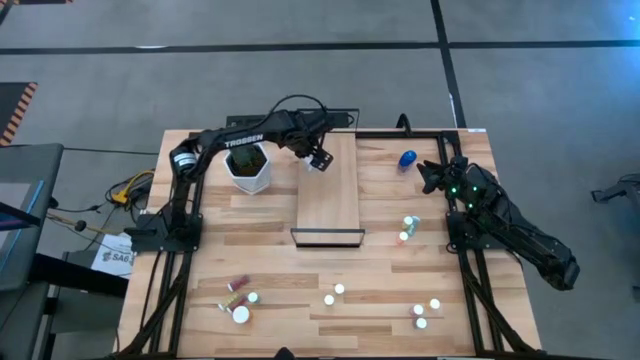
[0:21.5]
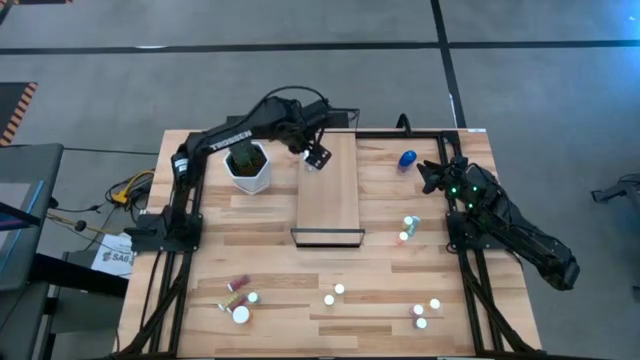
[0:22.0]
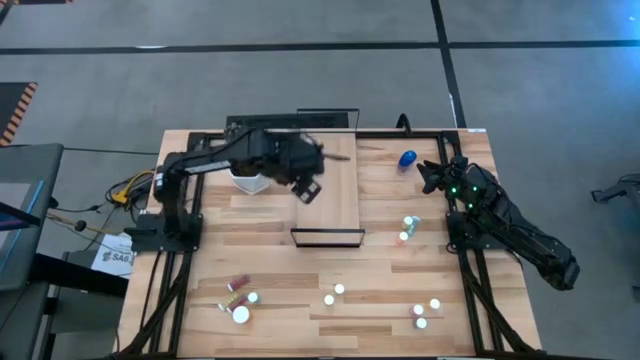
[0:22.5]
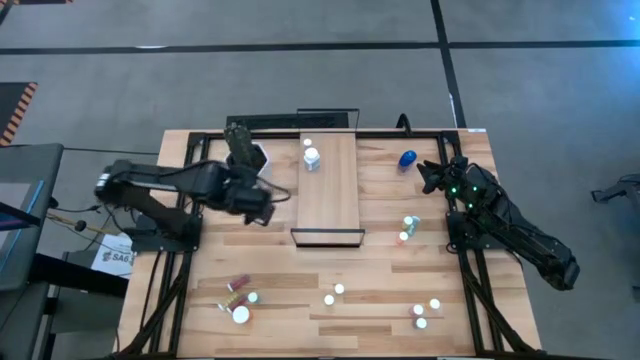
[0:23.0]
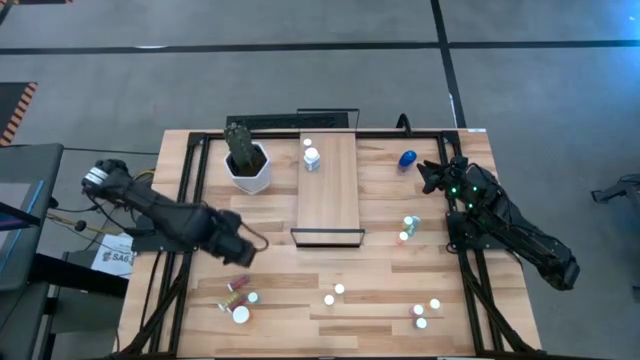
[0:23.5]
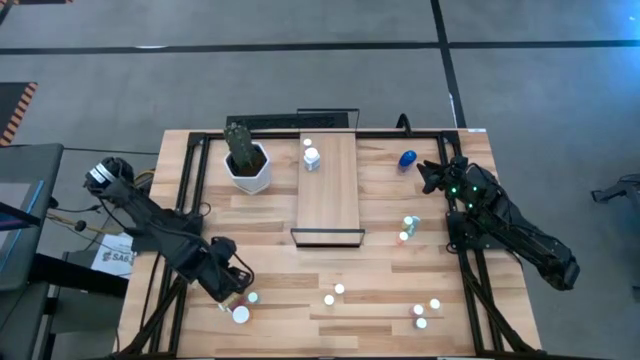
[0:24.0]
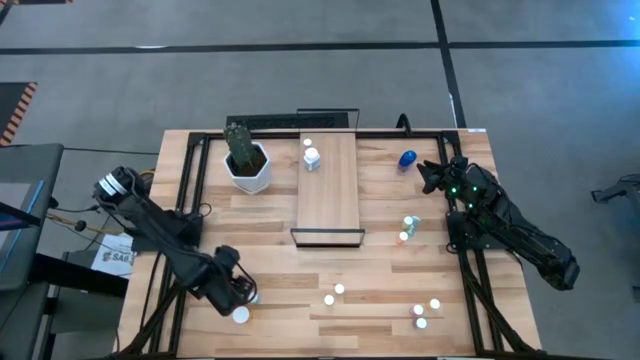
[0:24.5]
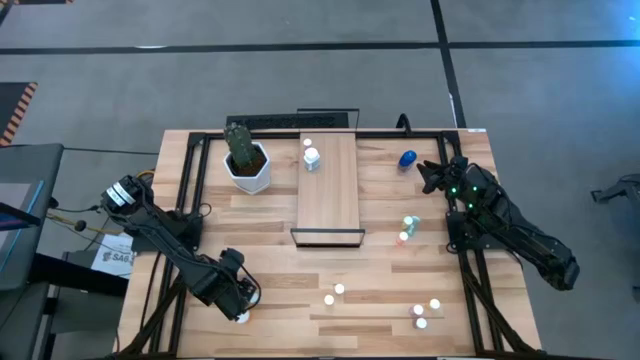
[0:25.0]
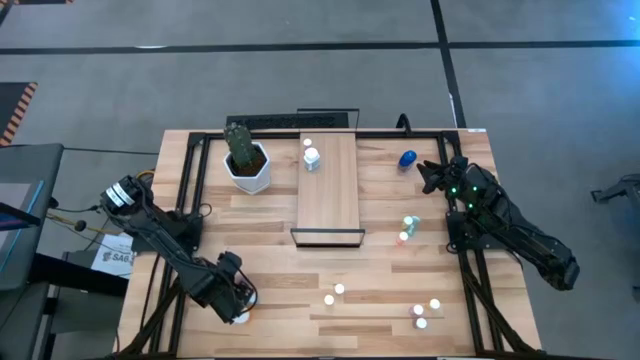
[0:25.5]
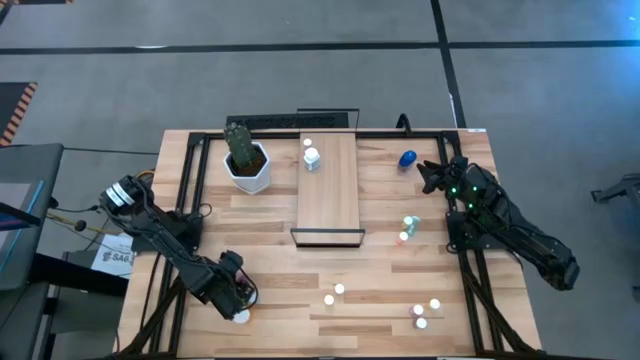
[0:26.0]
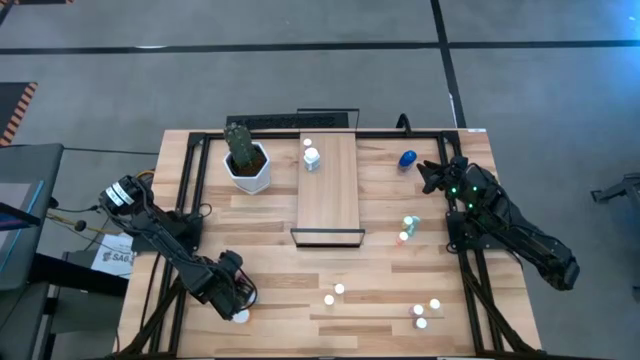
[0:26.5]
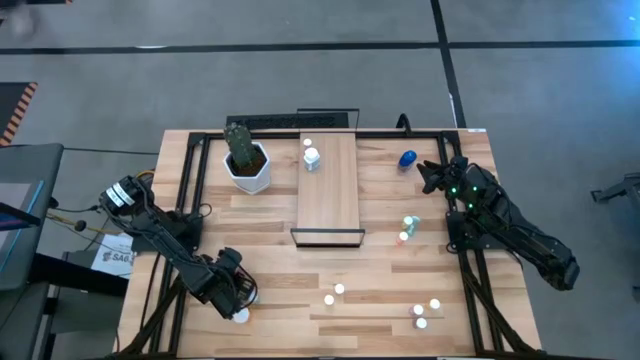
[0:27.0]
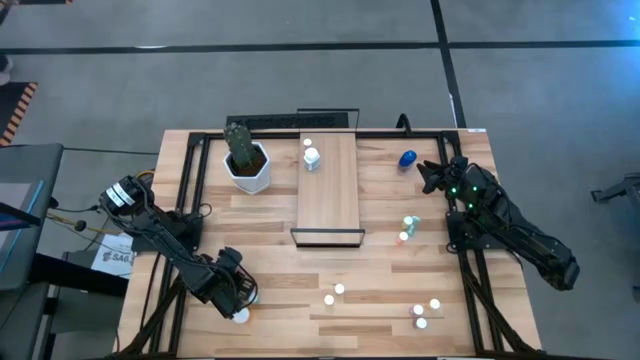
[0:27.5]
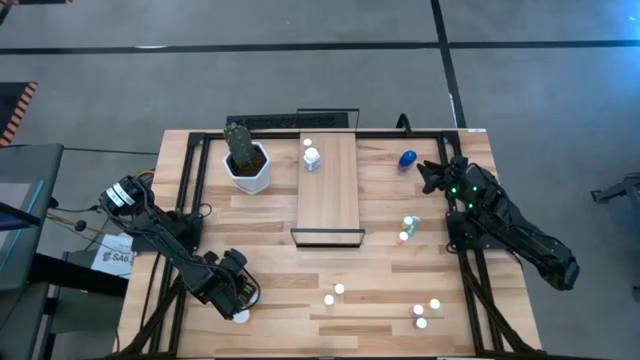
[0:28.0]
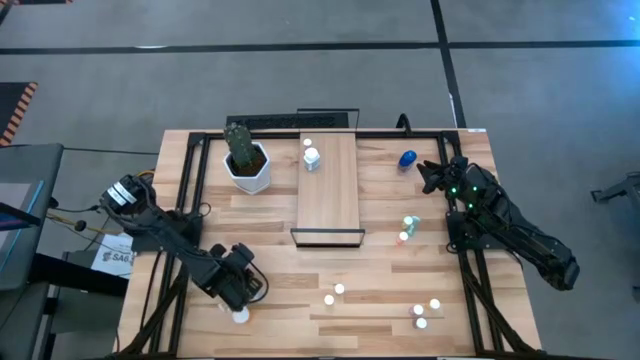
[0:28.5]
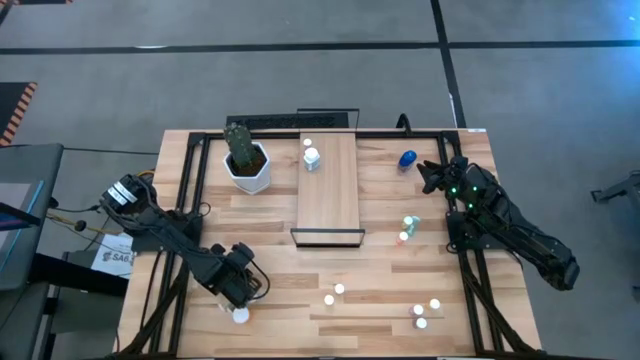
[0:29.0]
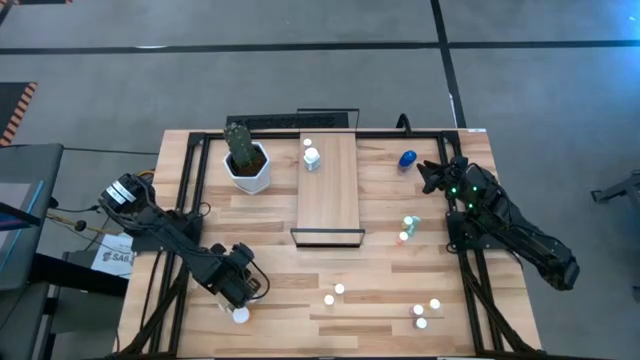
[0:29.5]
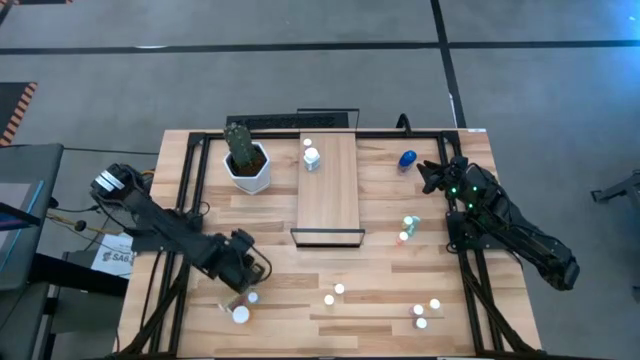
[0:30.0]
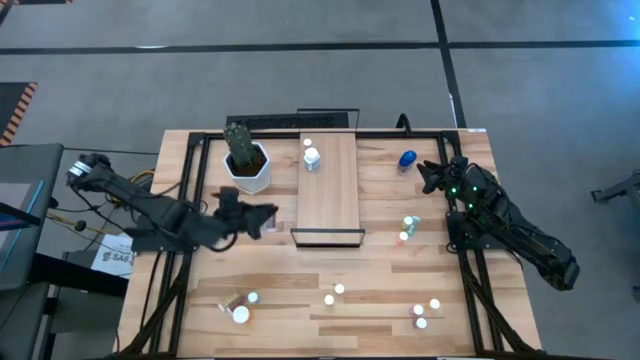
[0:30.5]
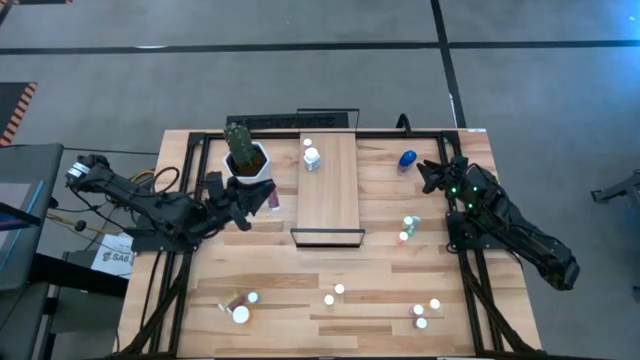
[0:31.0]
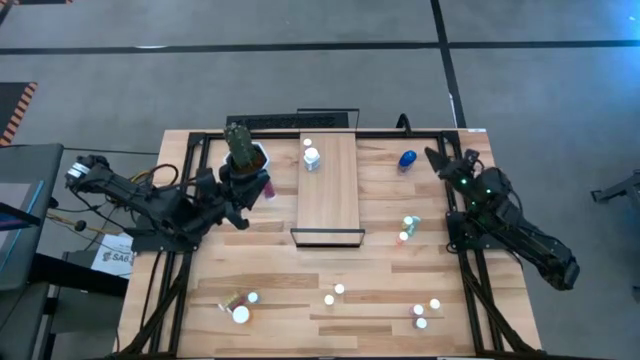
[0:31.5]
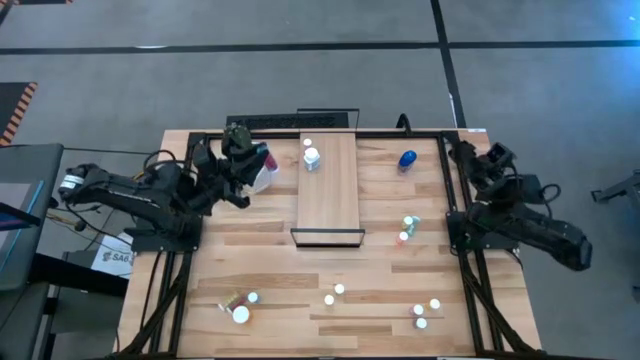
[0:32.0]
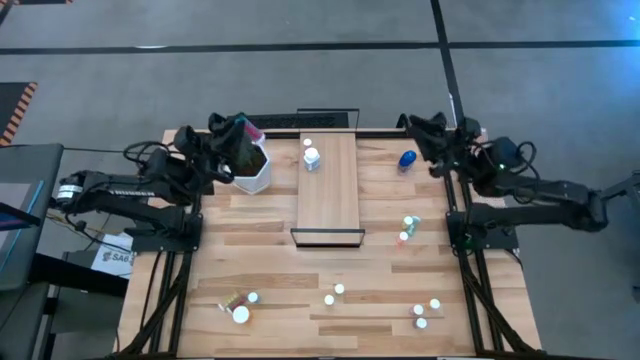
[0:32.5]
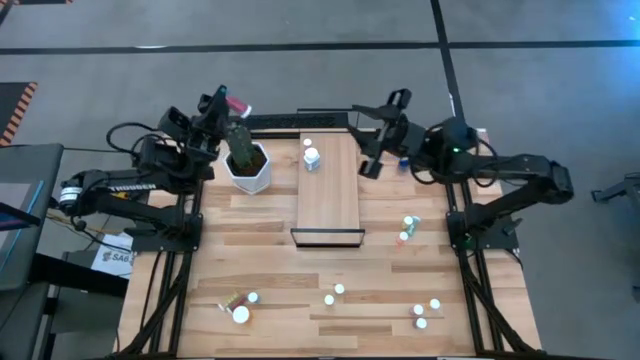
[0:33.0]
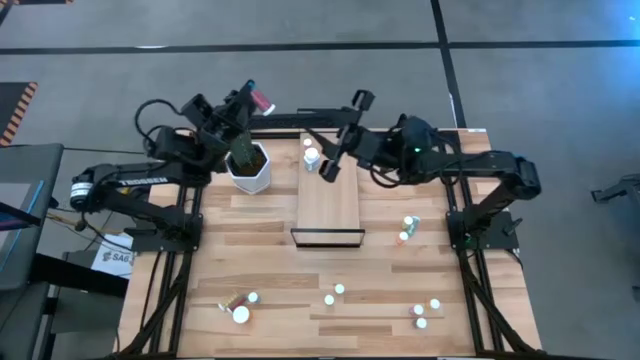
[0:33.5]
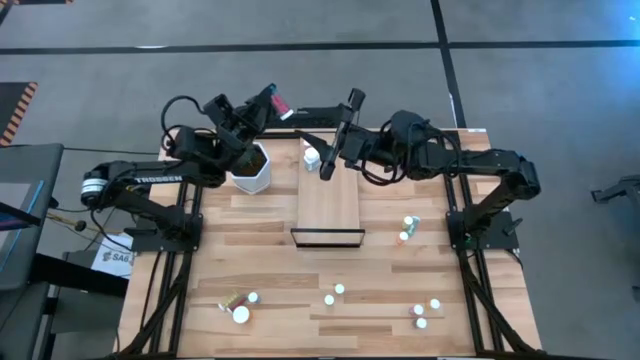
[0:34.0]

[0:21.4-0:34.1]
Task: Pick and place medicine bottles onto shelf by color
Put the blue pill bottle on the shelf

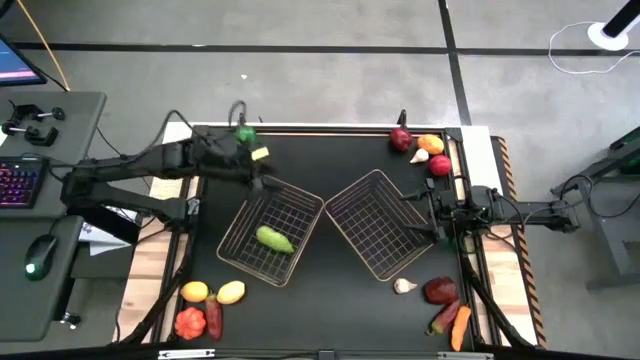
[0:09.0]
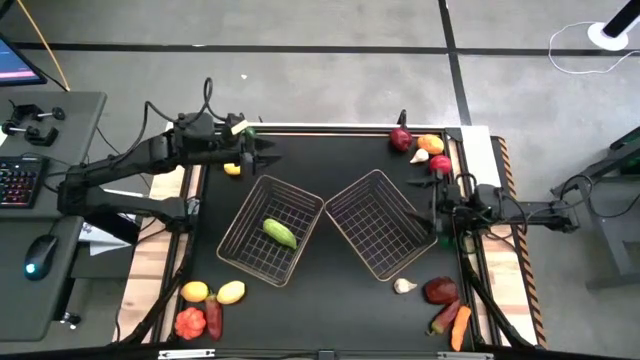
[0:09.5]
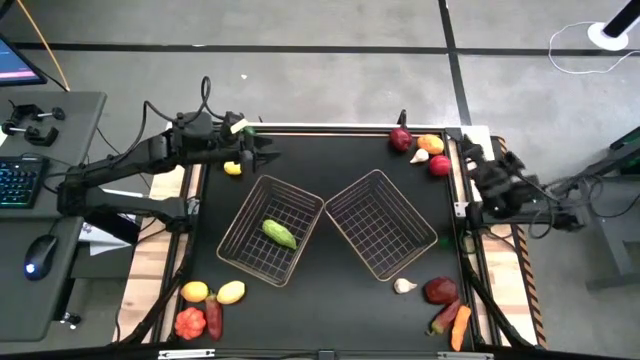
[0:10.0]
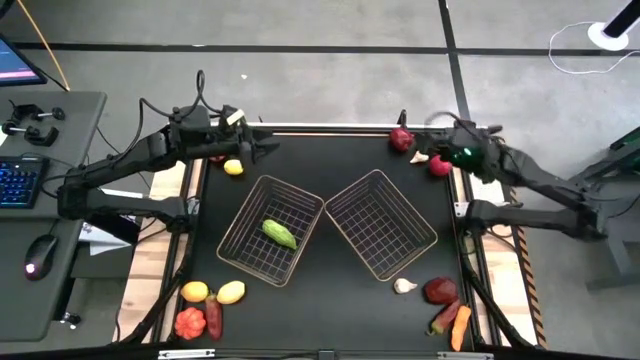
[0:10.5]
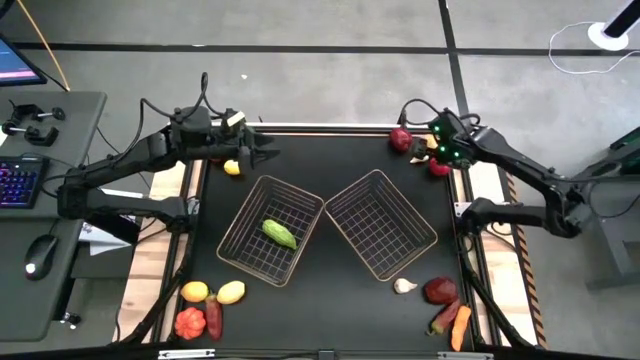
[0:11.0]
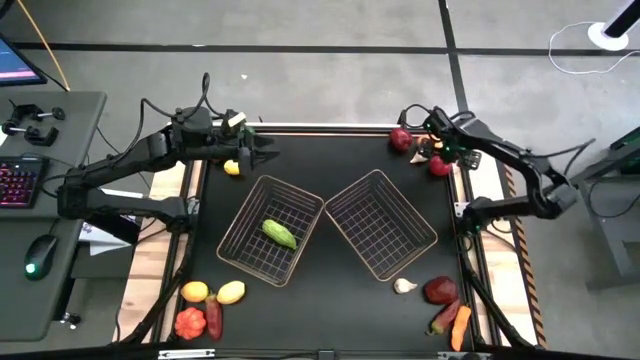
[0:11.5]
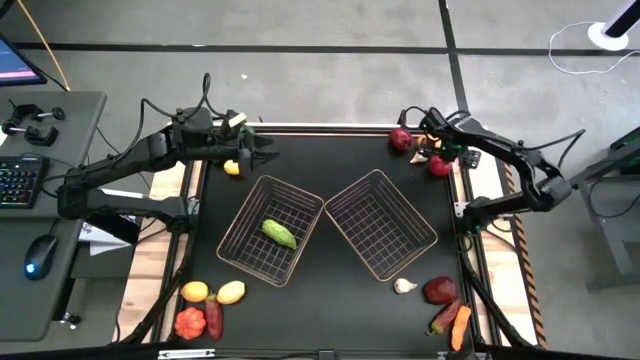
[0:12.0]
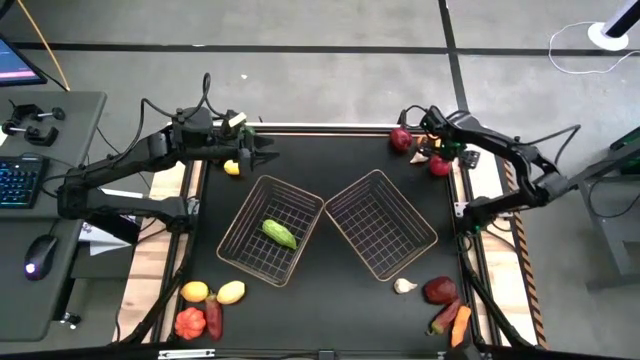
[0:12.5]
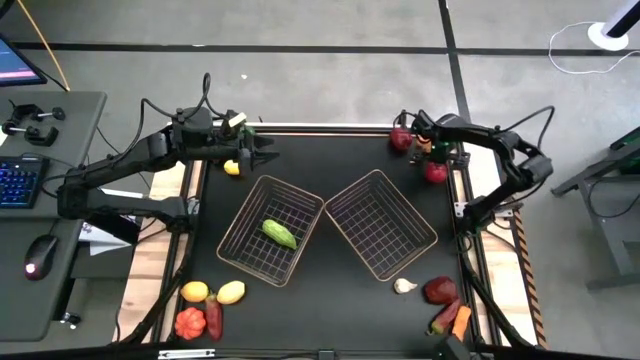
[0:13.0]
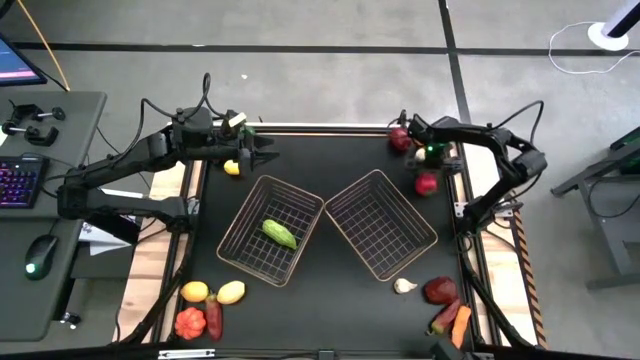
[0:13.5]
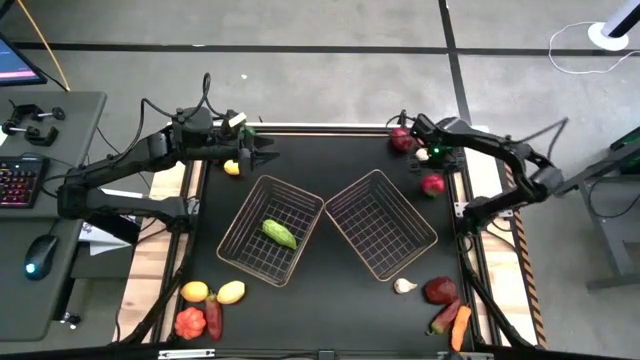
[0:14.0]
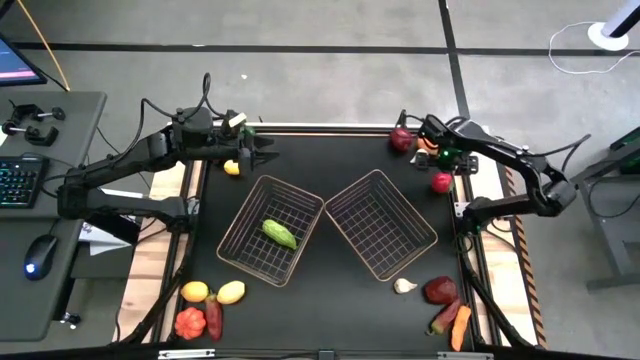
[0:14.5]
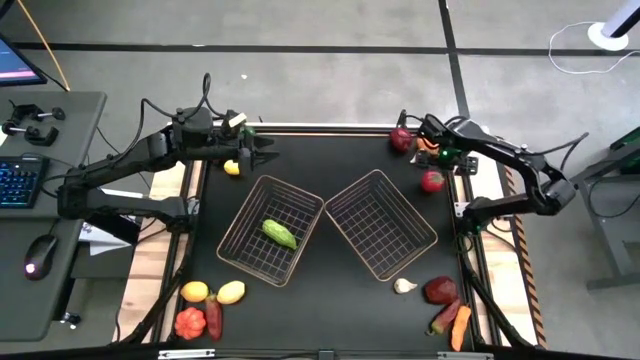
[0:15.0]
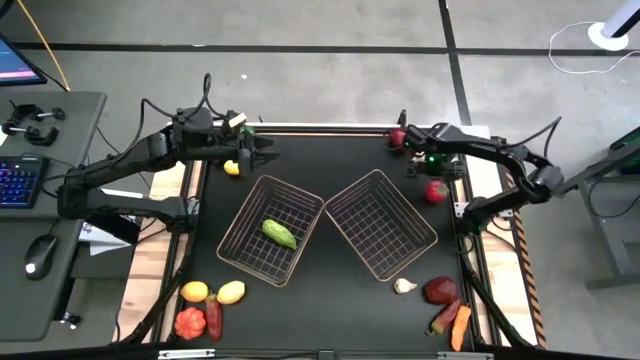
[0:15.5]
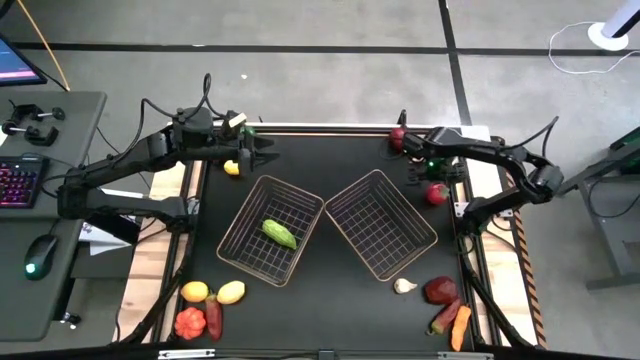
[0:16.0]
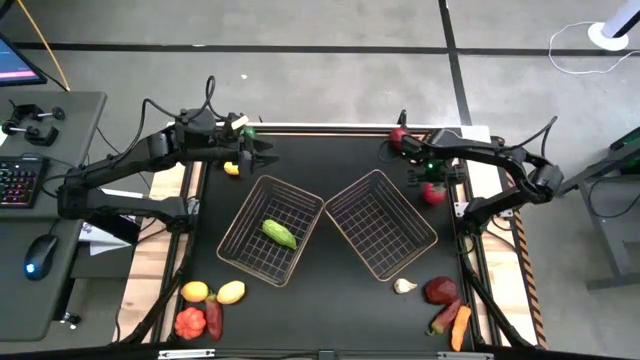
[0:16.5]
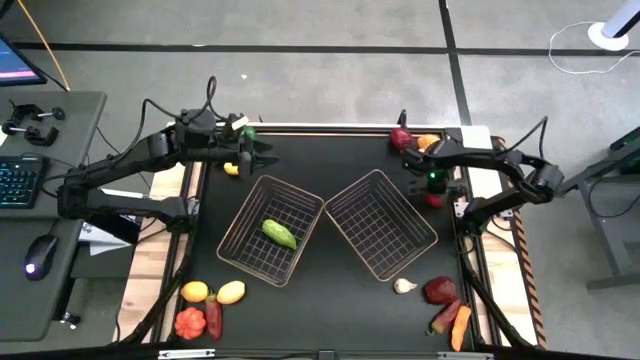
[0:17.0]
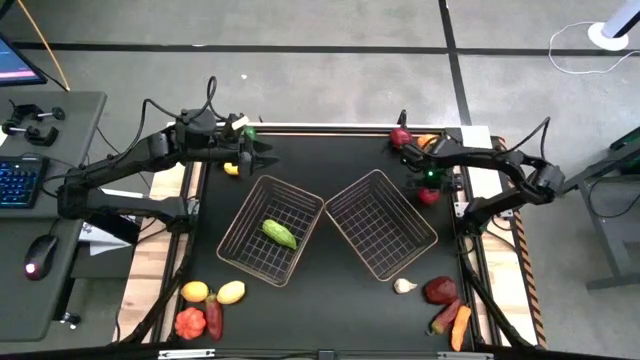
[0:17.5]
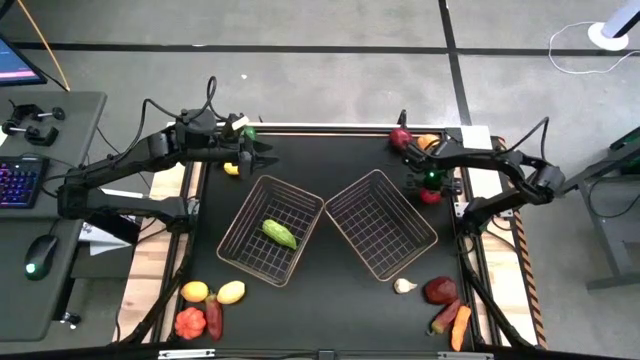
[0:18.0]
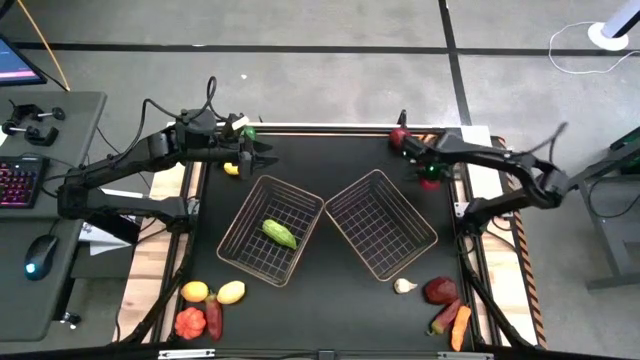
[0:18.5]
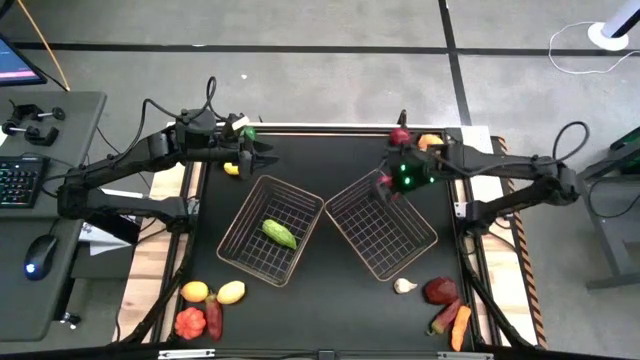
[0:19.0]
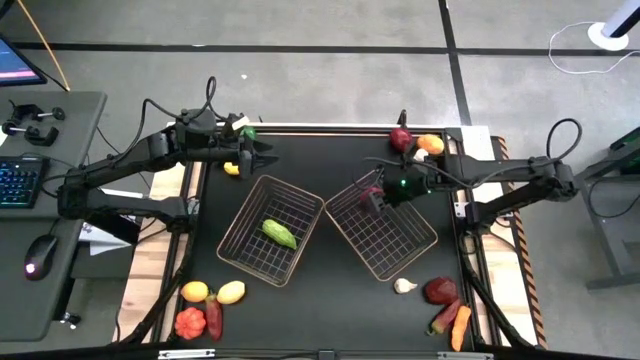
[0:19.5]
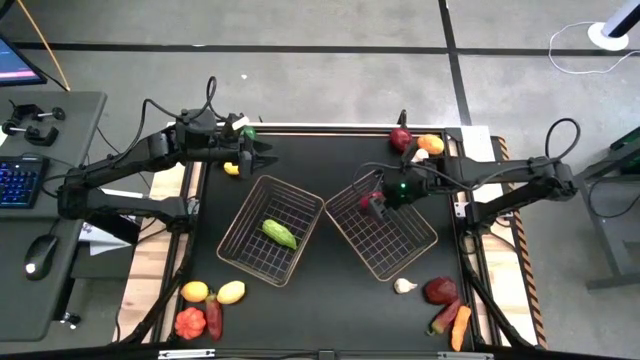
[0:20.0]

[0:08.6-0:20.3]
Task: Sort produce into baskets
Put the tomato into the right basket
